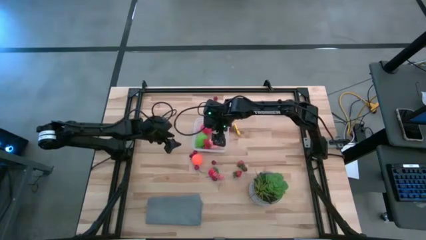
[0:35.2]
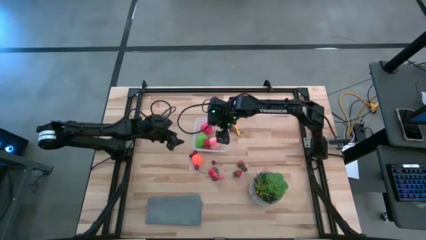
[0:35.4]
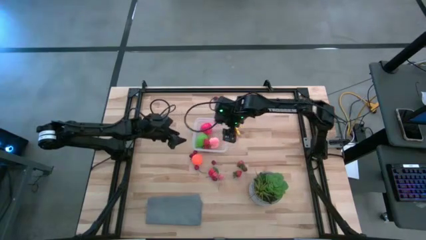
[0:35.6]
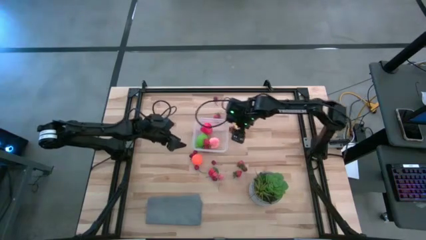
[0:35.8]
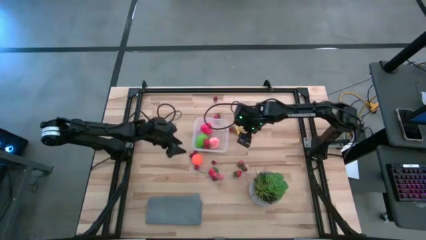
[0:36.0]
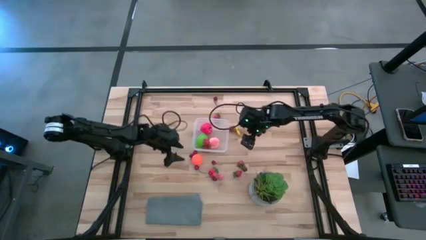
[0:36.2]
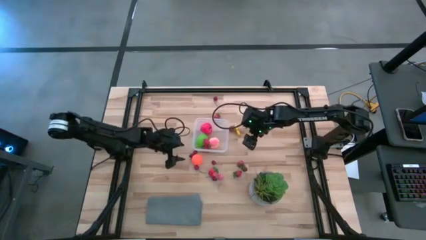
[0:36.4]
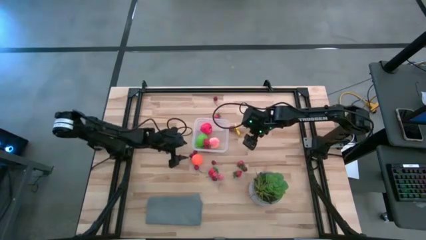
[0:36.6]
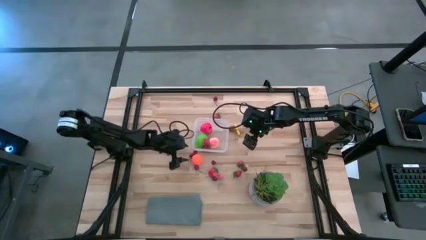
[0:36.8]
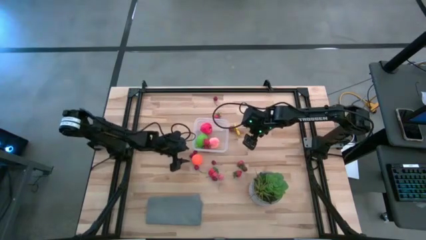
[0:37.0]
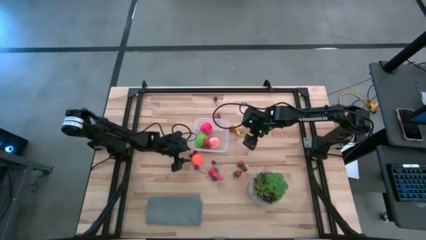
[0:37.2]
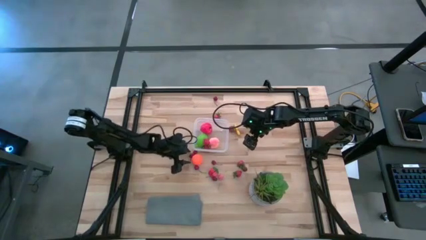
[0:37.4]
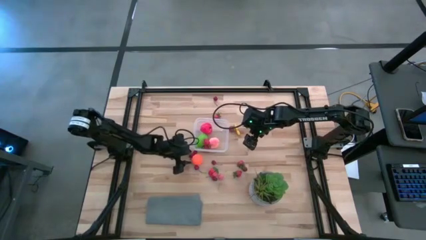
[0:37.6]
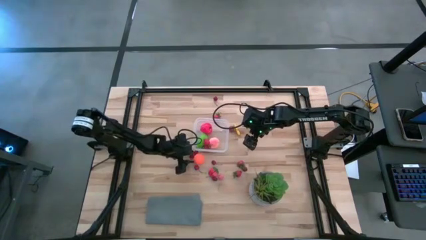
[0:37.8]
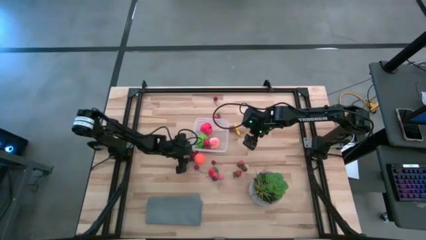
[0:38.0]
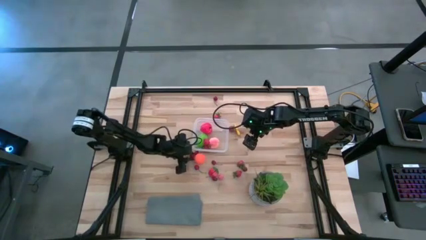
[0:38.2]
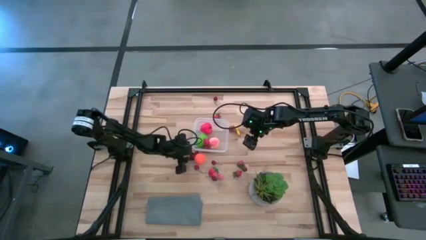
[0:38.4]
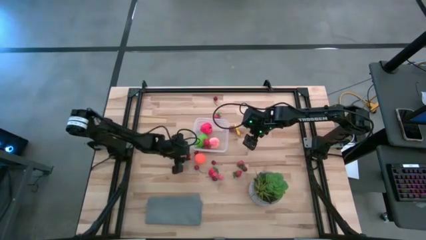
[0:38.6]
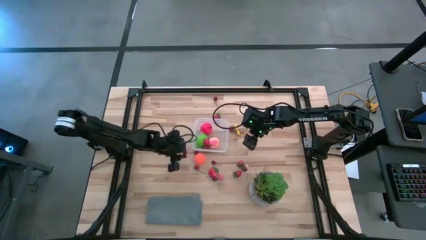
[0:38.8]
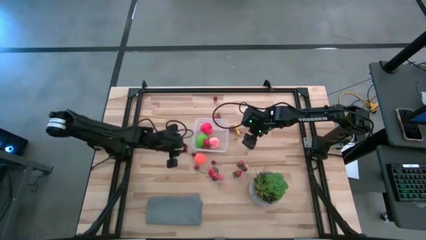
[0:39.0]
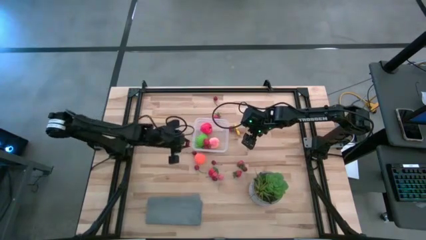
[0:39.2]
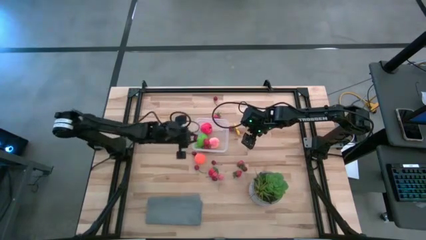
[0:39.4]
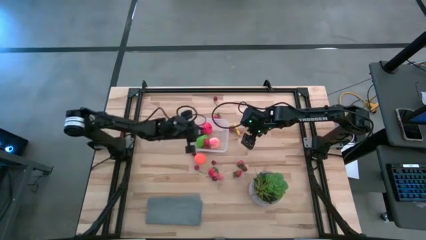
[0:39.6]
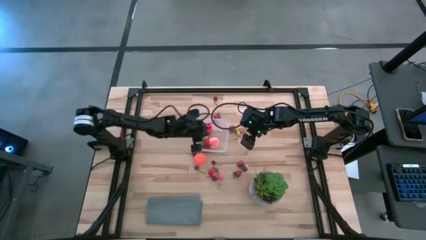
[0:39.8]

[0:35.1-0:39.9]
Task: Pick and placing Produce into tupperware
Put the red cherry into the transparent bin

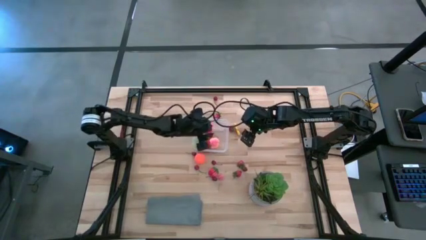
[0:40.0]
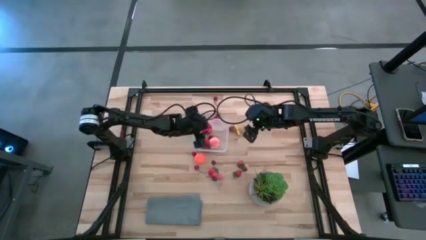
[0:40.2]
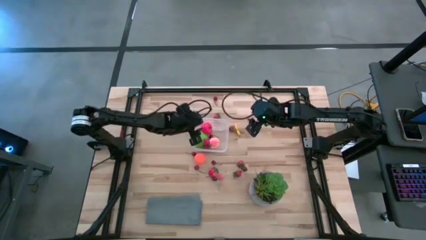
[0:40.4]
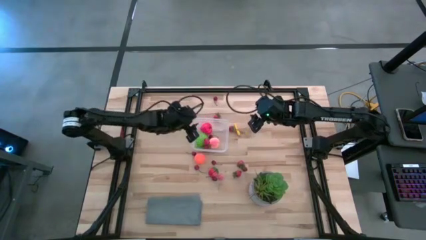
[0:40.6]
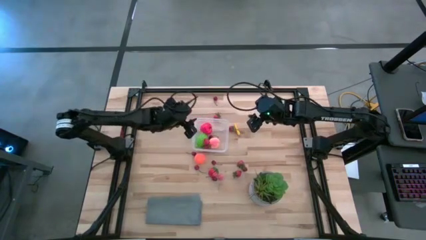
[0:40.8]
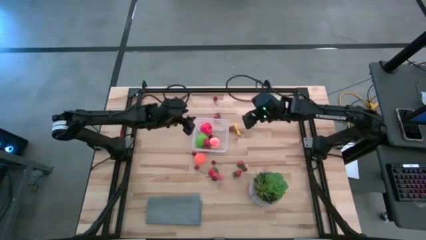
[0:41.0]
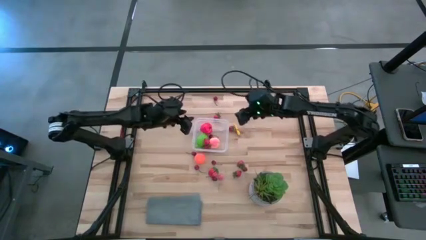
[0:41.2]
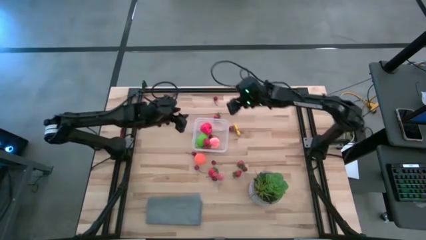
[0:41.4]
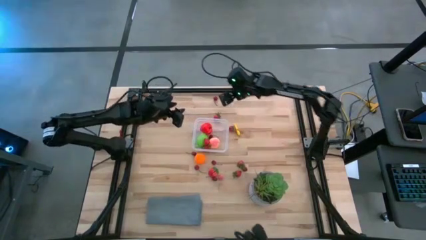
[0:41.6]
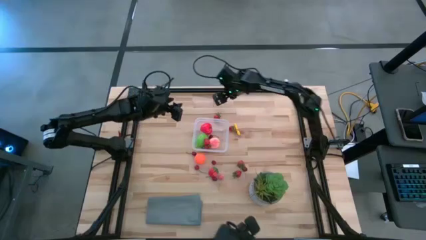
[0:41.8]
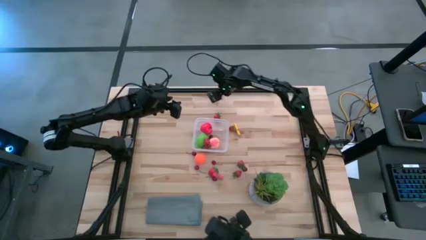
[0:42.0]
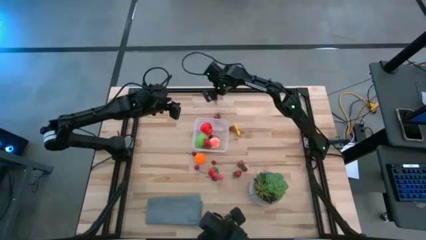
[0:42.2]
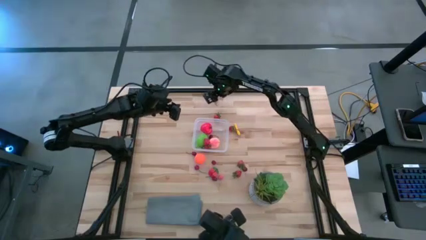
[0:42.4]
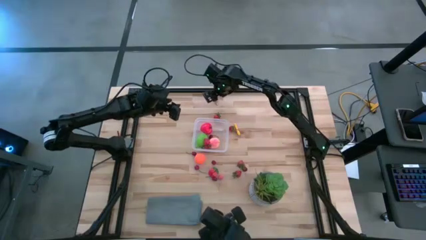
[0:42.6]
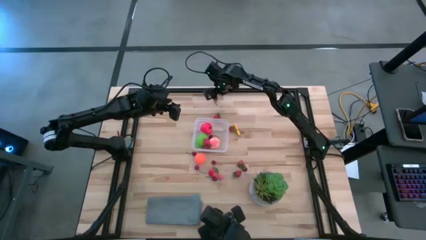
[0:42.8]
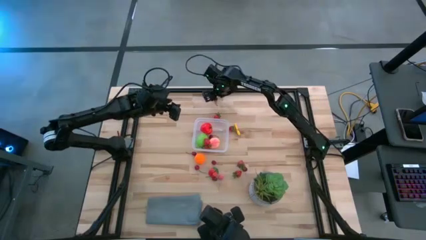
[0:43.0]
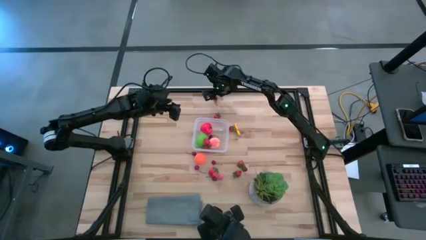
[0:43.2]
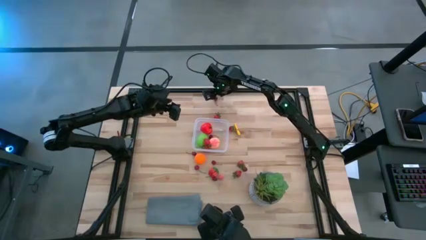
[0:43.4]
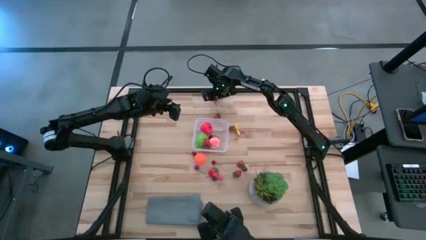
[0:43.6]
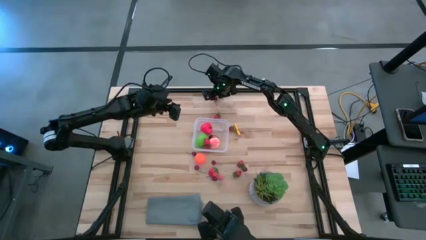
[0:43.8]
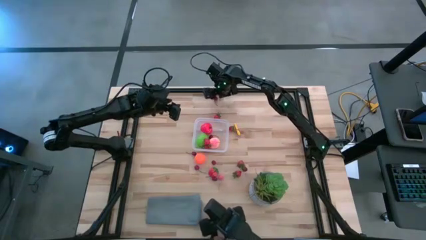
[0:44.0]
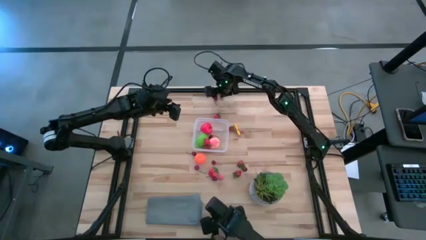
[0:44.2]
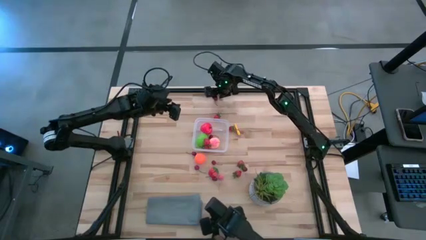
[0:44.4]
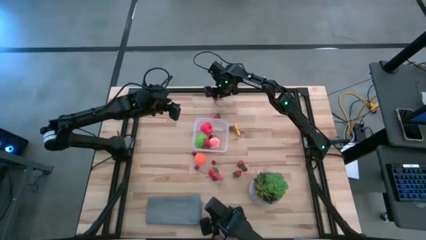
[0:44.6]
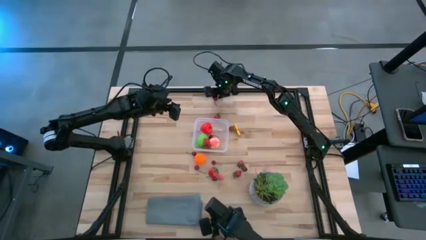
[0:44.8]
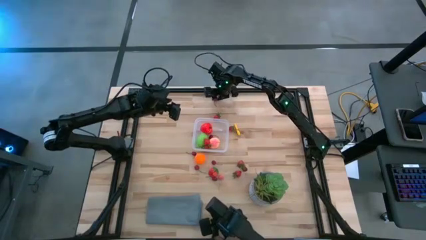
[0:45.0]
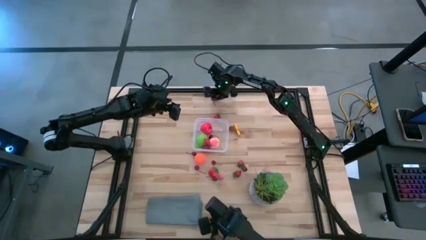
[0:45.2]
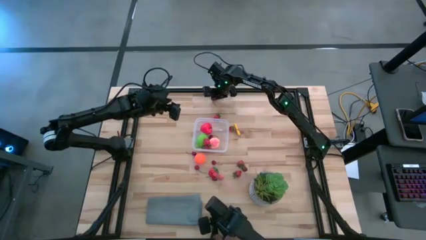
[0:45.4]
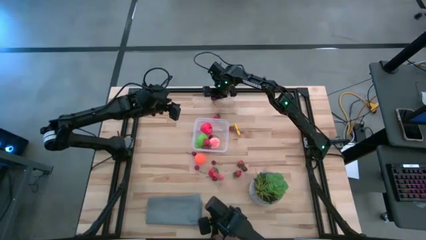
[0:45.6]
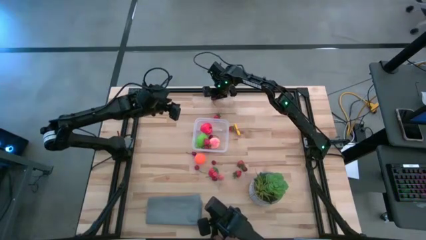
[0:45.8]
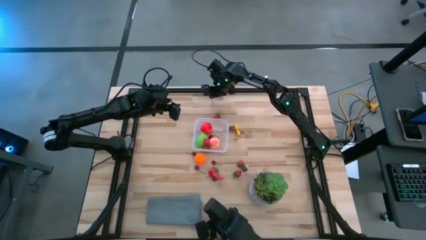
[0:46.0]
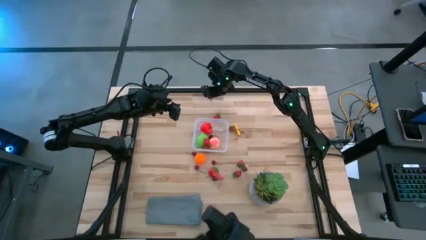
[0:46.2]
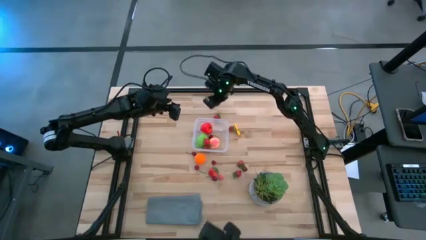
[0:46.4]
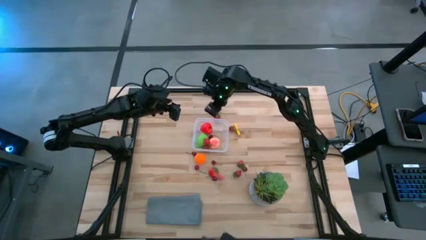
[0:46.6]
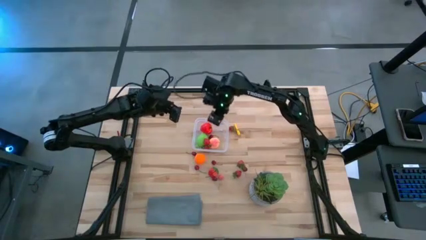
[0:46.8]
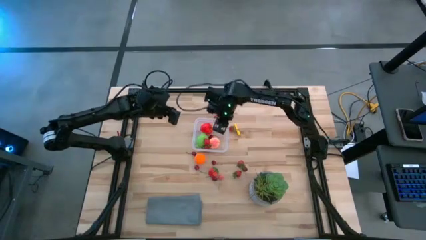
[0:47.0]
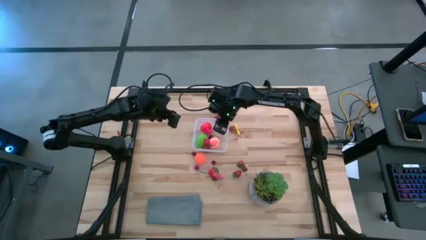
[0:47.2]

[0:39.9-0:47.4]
Put the red cherry into the transparent bin

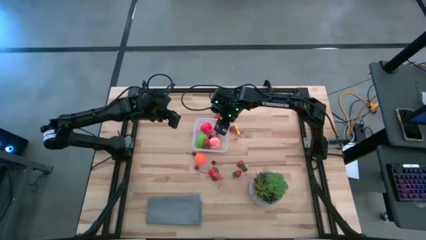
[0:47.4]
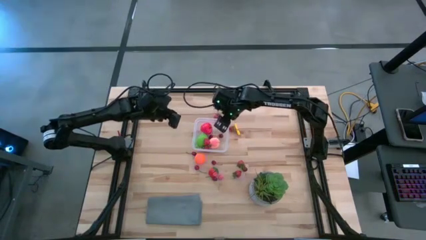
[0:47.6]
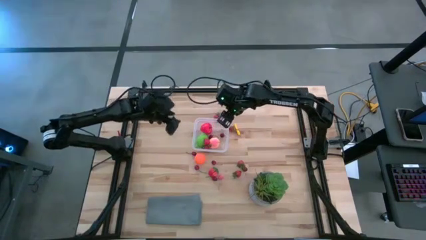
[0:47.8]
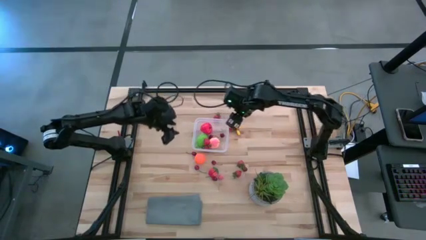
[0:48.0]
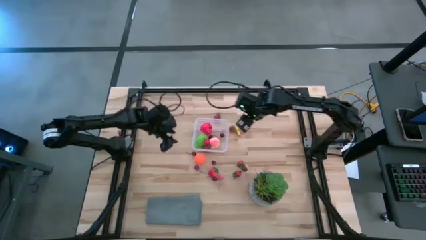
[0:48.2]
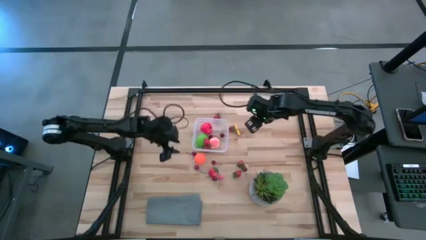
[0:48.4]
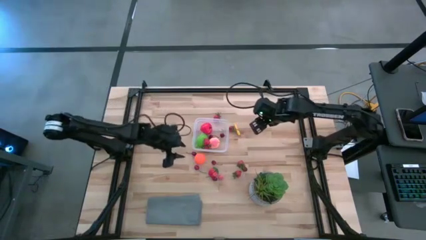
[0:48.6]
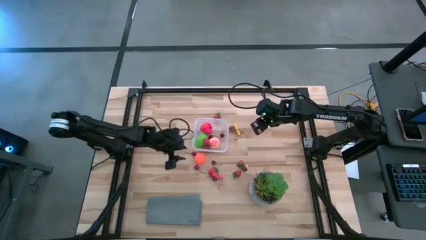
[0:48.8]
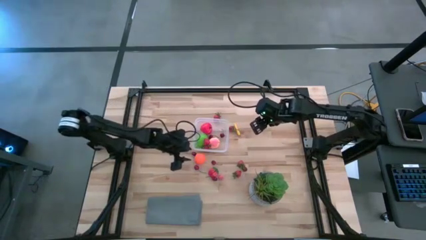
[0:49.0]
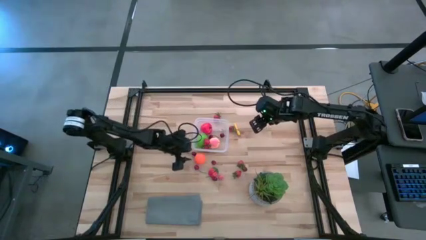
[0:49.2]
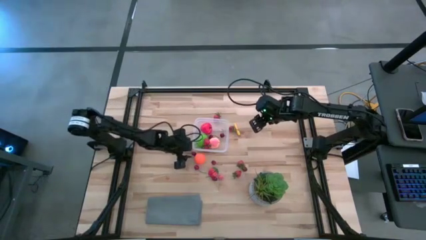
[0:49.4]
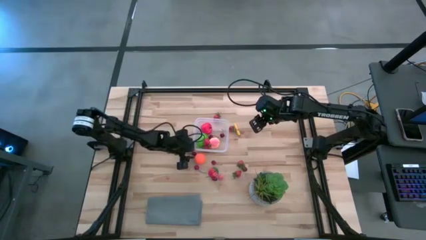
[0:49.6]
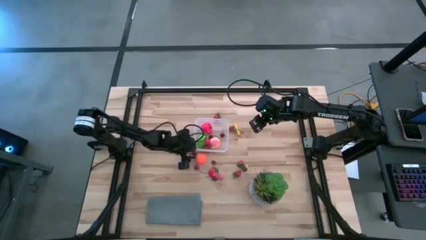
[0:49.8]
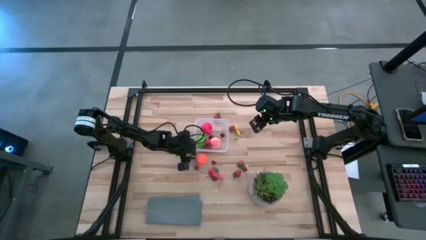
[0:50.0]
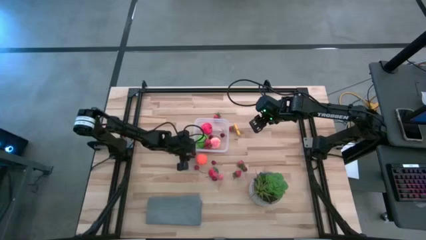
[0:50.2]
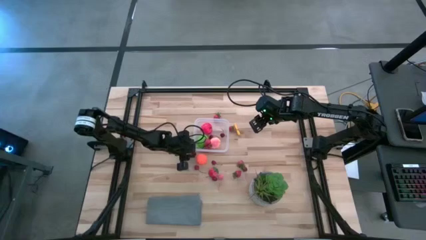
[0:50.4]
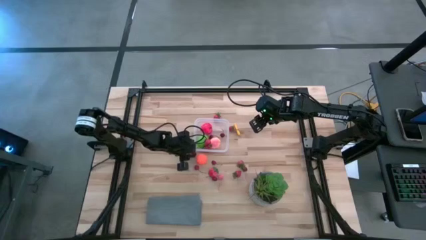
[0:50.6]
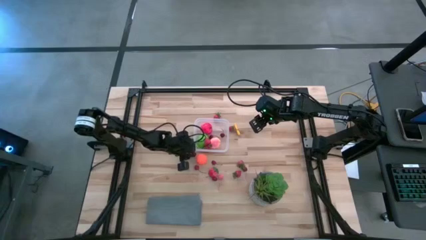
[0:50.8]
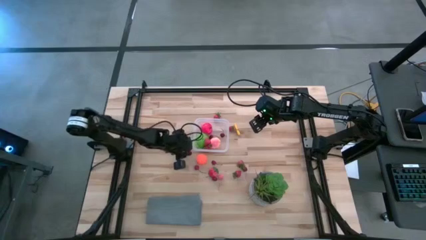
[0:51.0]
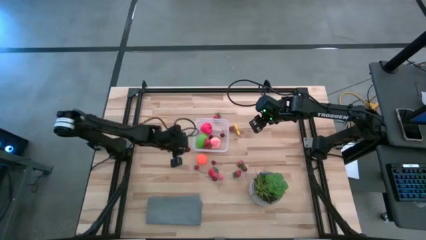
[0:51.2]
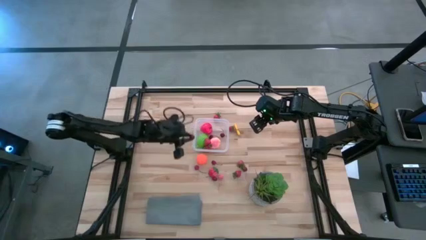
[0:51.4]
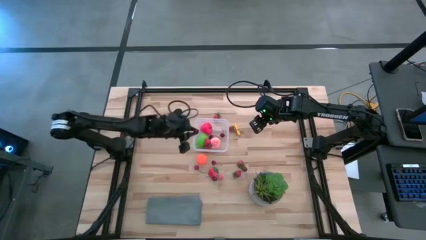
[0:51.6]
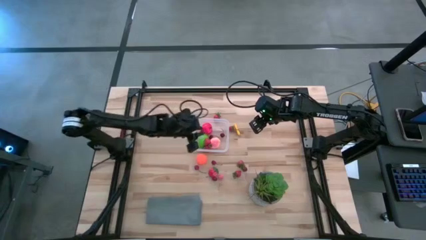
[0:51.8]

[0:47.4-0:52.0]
Put the red cherry into the transparent bin

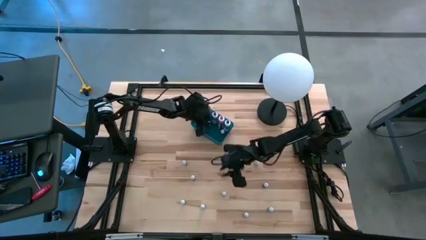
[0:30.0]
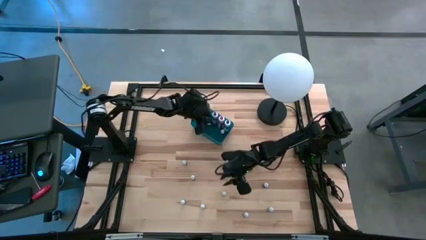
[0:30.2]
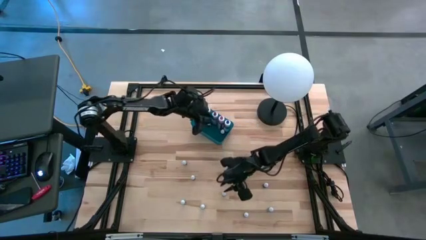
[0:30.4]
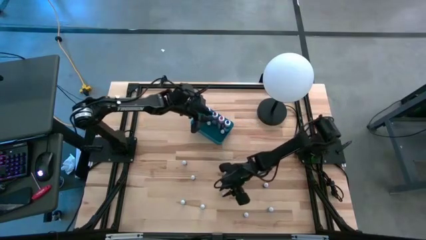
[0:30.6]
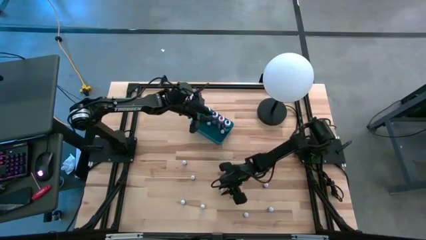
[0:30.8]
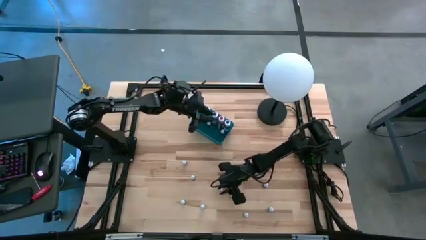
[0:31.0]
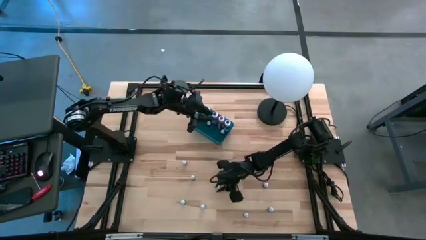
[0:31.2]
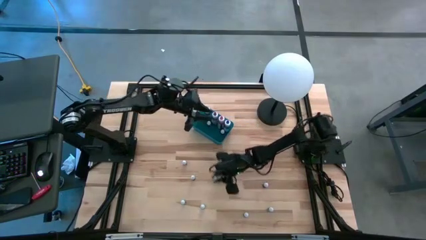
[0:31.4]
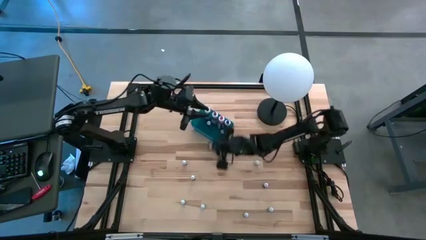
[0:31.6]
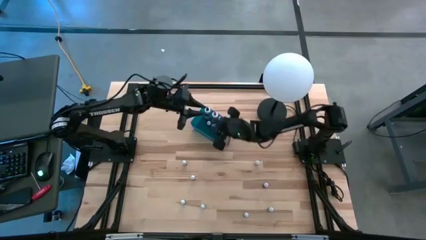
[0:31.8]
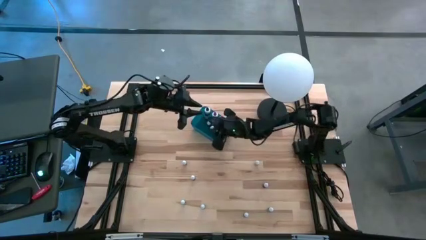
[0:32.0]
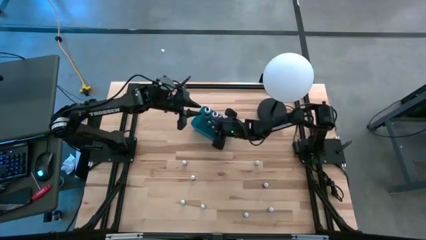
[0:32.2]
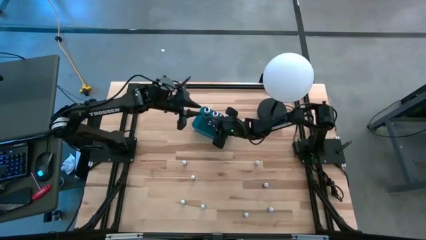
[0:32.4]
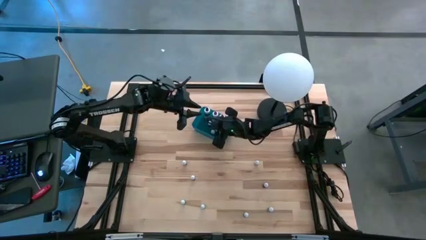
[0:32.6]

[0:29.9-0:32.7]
Task: Pick & Place food coloring
Put the small blue food coloring bottle into the blue bin
